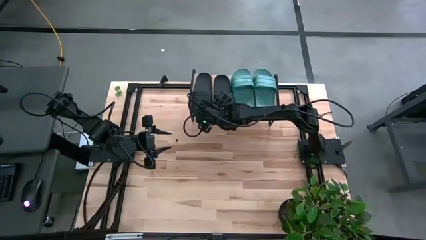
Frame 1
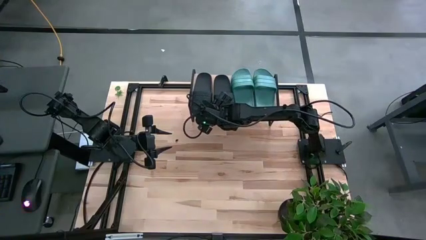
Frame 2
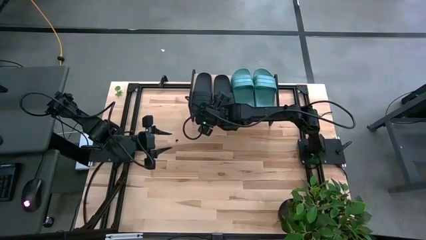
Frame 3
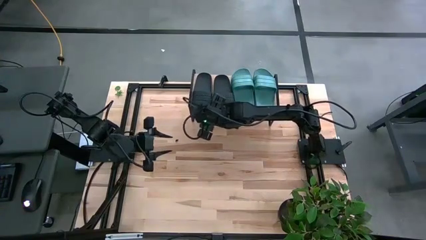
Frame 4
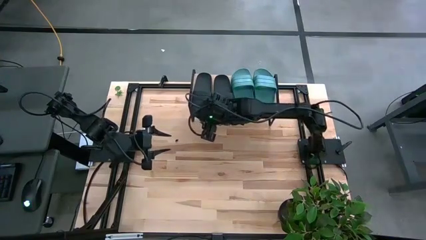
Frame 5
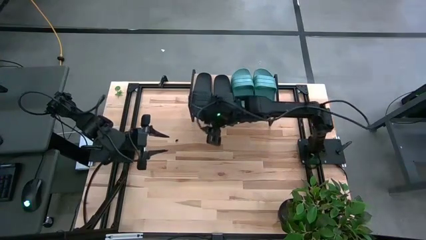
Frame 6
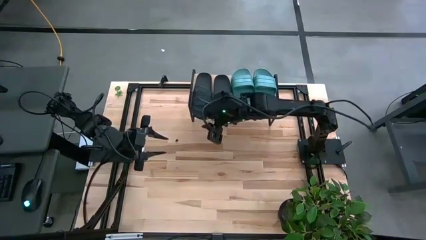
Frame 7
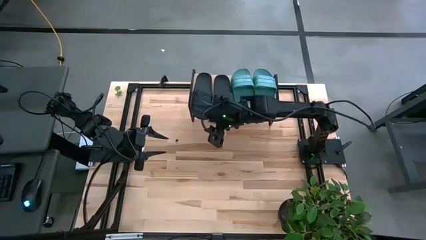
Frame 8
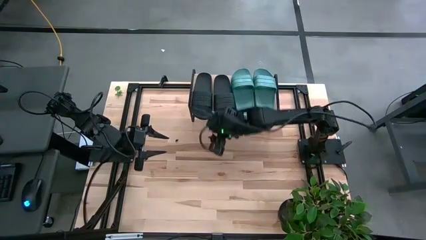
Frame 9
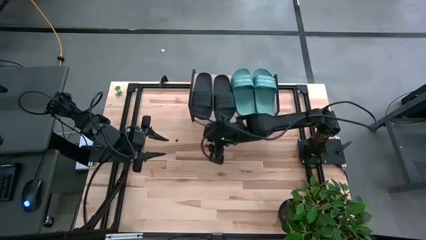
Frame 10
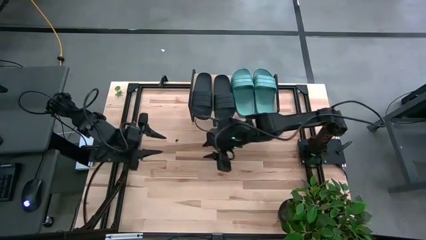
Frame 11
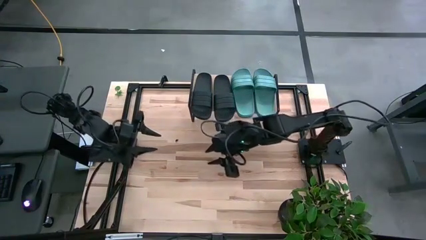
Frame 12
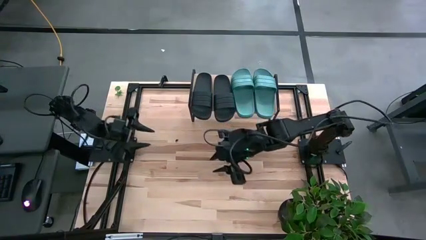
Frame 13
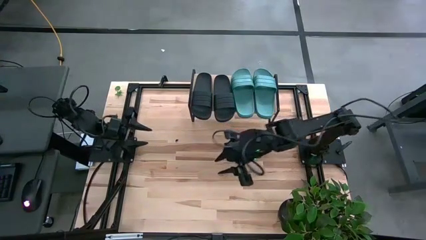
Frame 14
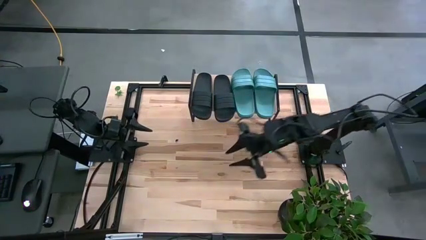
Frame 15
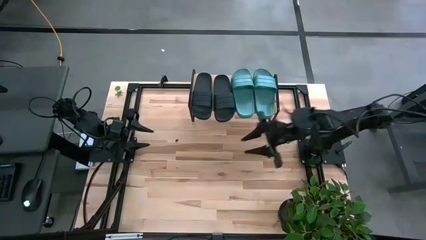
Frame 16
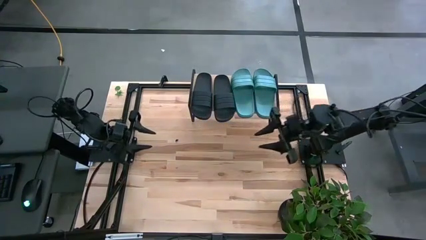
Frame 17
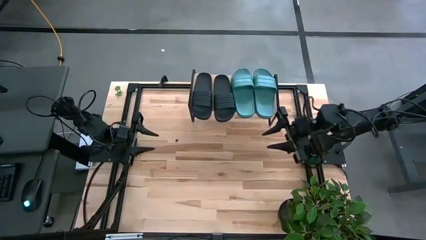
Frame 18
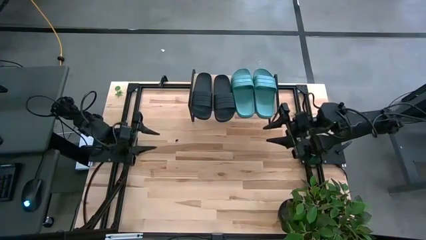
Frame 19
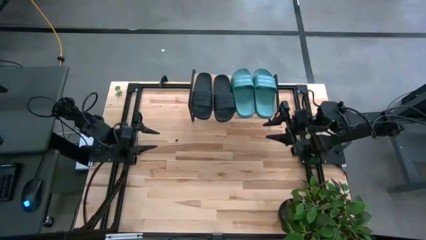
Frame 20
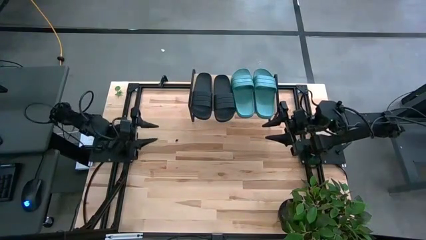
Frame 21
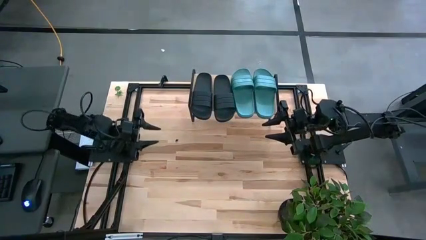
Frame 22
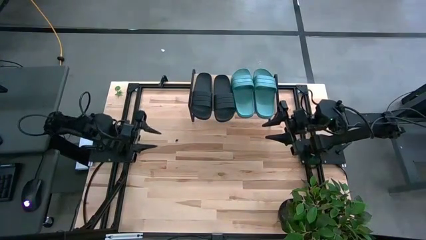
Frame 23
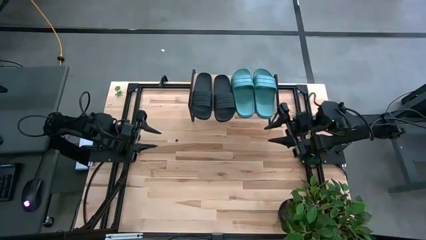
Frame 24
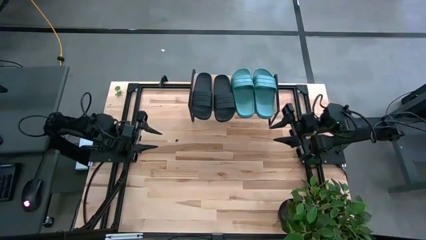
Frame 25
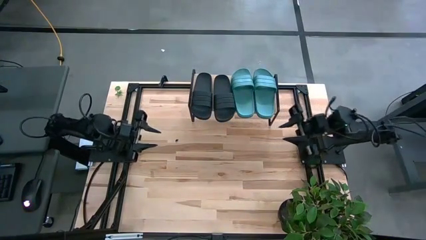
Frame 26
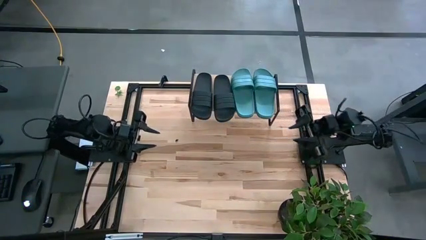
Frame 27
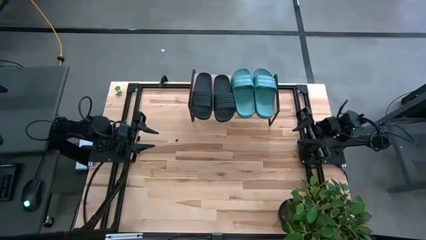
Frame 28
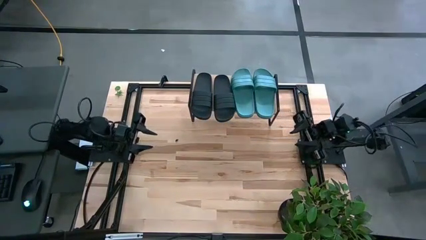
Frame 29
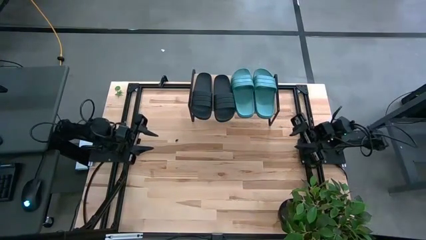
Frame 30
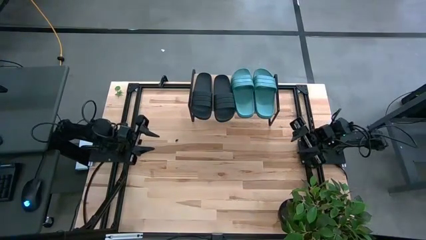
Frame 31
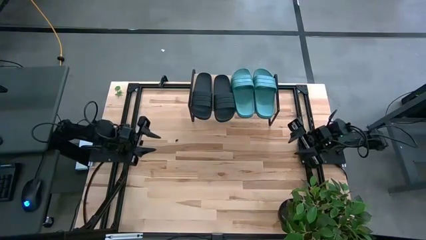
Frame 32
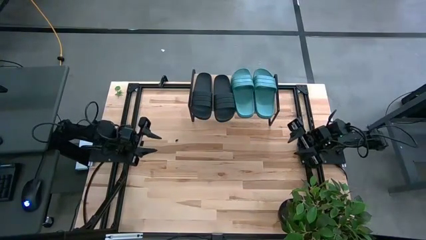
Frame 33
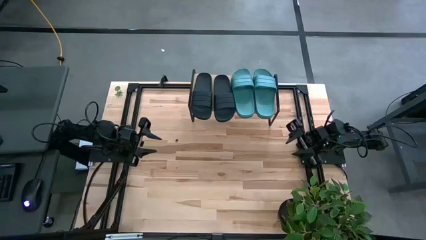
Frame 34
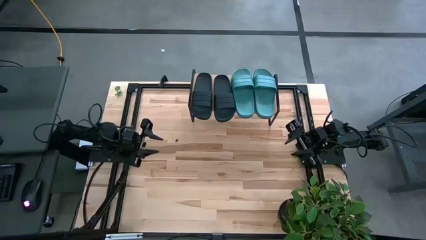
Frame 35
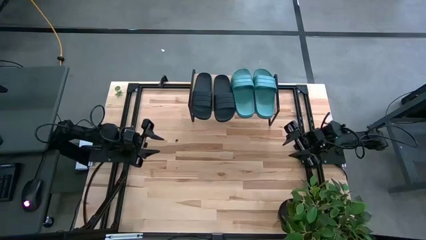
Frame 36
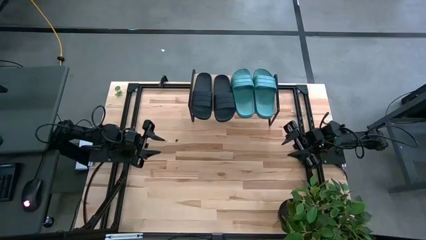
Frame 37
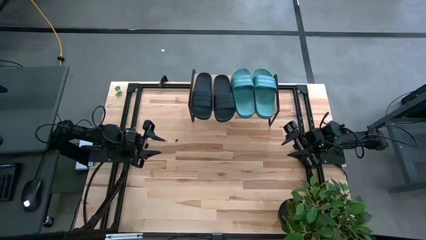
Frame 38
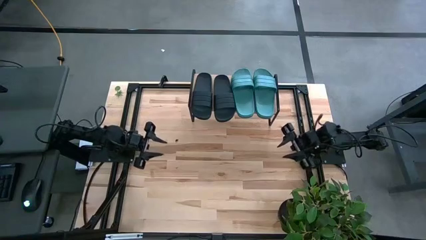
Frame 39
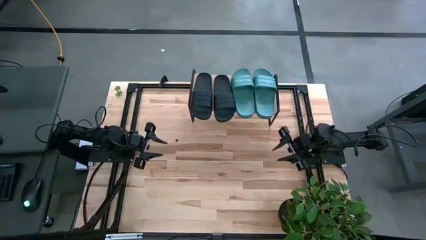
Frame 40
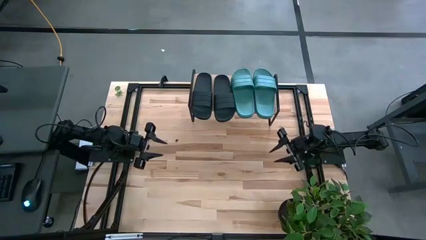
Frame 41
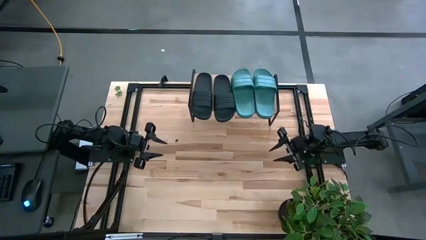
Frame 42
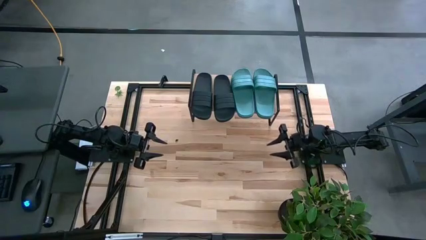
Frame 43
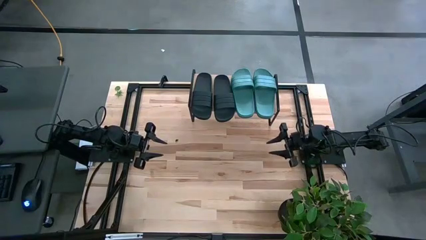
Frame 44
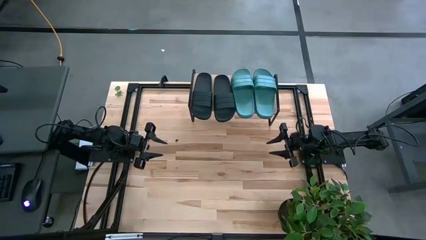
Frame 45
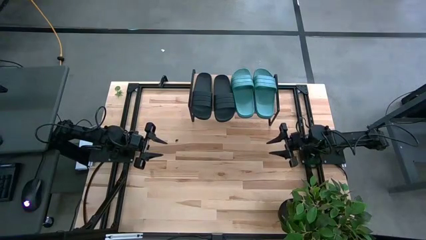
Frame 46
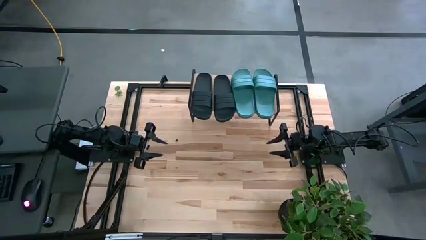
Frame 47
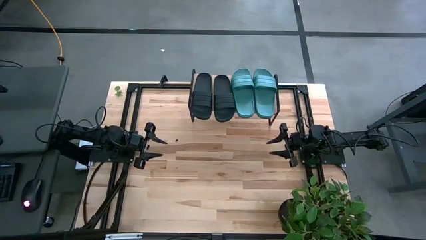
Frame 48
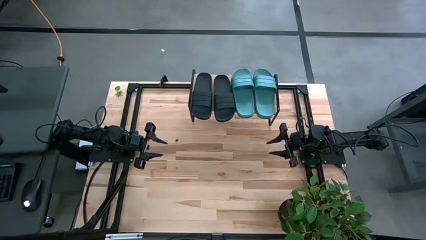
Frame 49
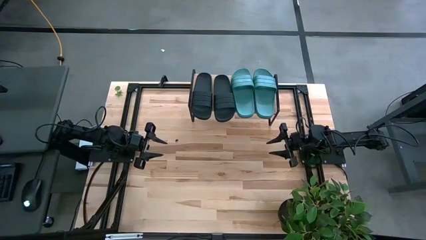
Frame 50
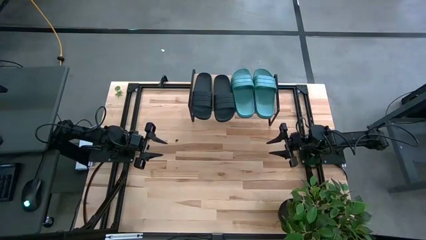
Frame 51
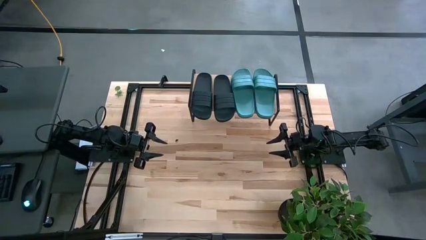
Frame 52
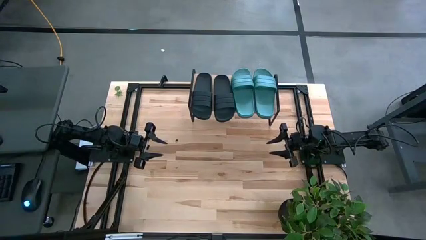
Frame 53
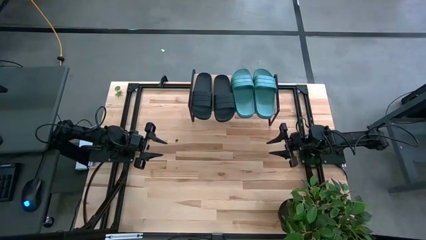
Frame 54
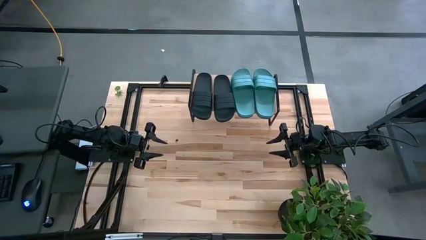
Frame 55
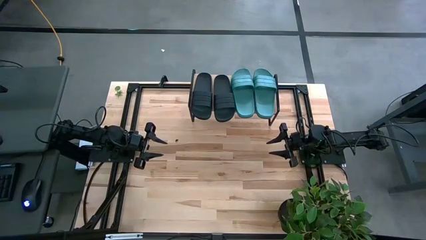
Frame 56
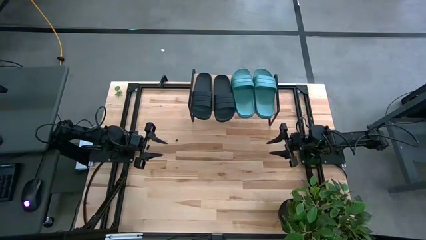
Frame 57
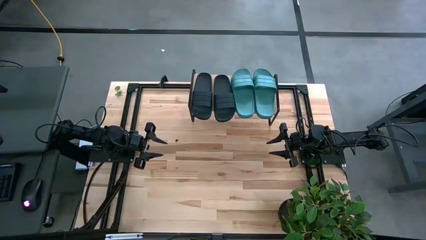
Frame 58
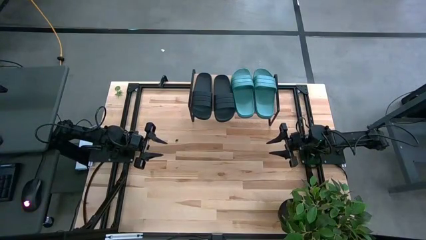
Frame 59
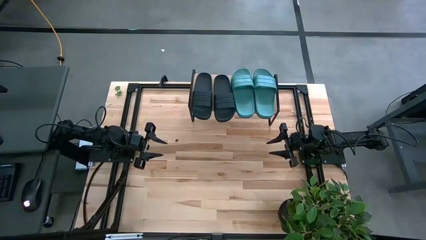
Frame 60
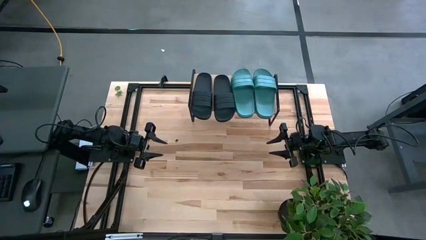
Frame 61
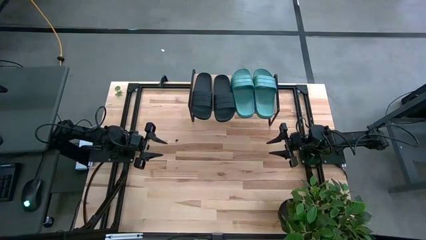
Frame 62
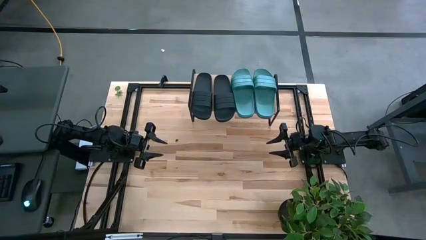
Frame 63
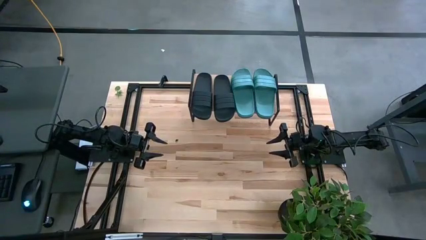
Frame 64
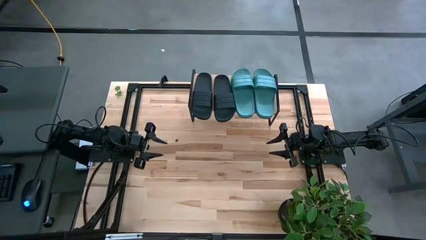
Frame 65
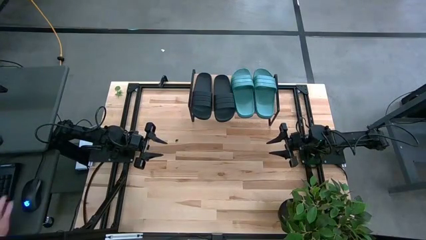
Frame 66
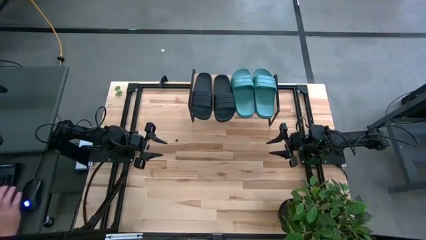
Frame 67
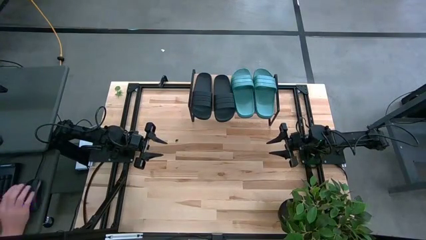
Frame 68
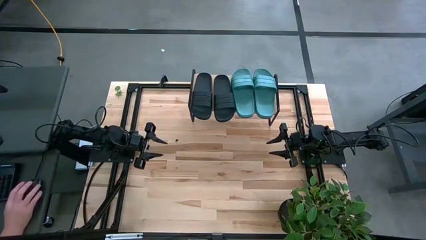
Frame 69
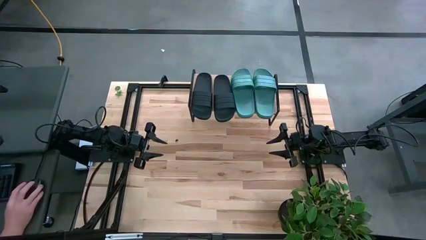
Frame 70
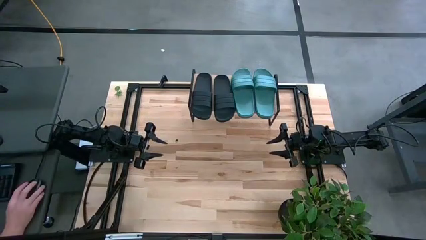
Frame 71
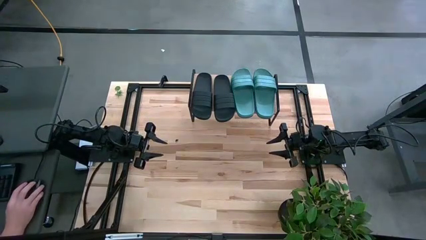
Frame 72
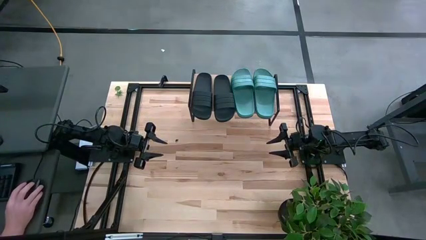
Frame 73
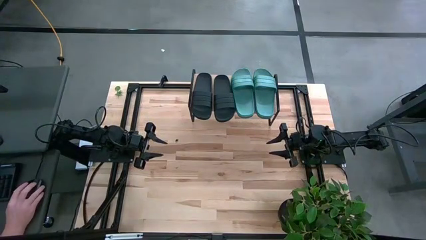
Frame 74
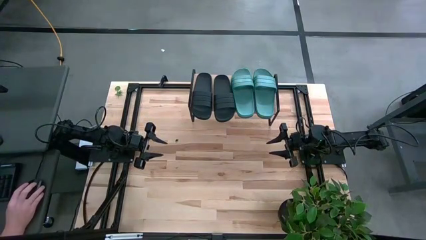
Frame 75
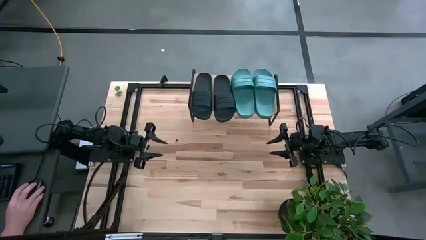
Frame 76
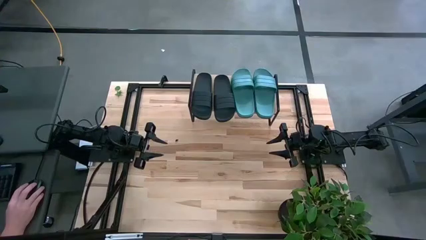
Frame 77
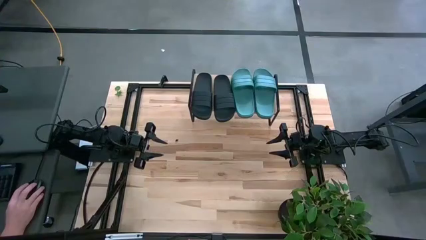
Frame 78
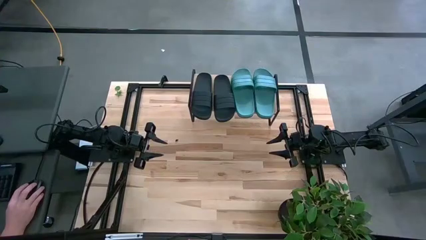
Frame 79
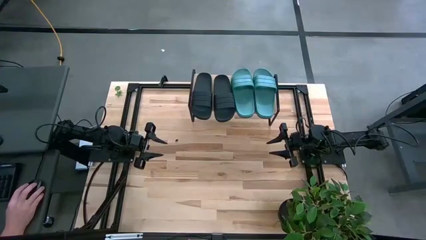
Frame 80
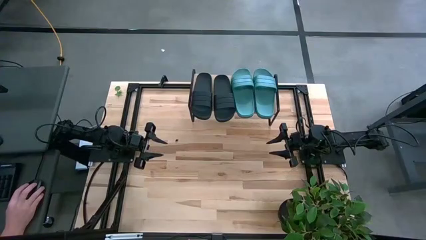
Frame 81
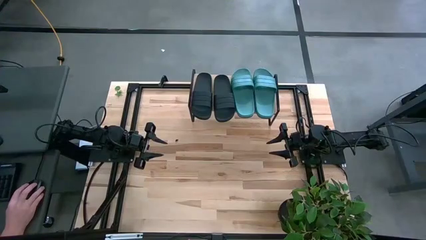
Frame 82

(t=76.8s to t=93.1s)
Task: Pick and place slides into the shelf
Return to Home Position
